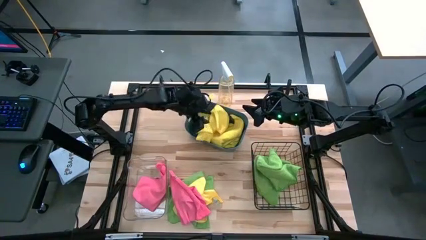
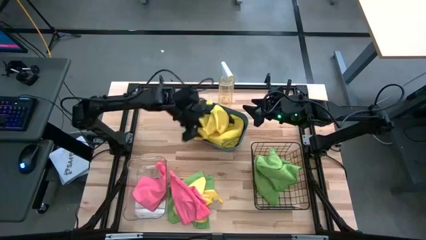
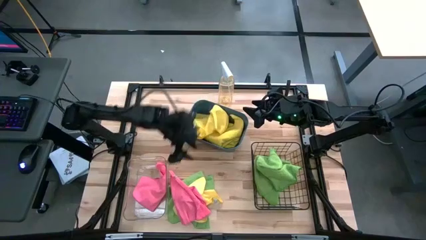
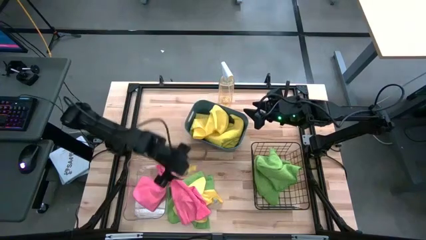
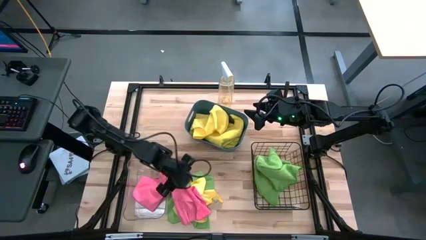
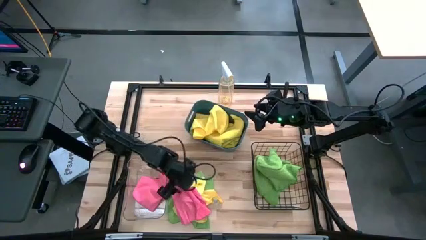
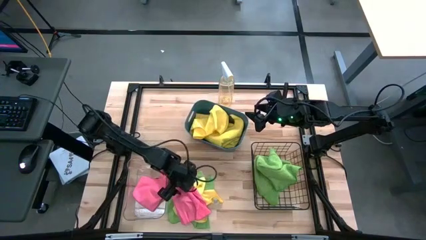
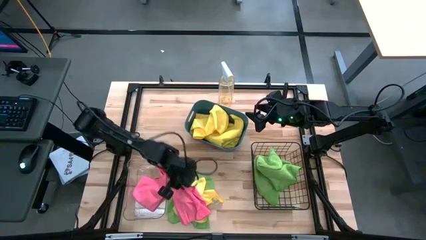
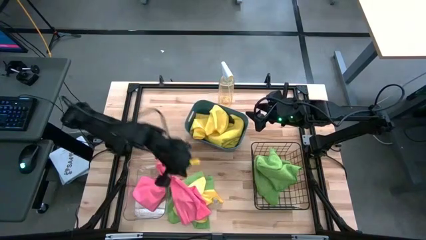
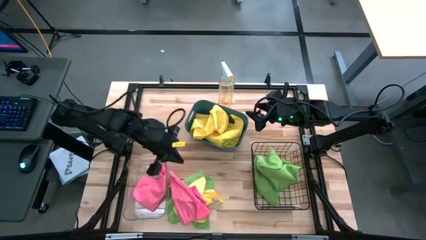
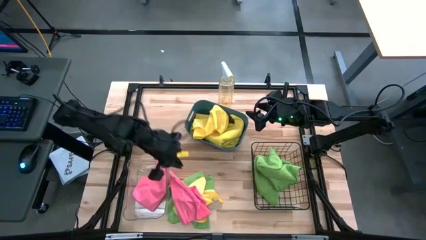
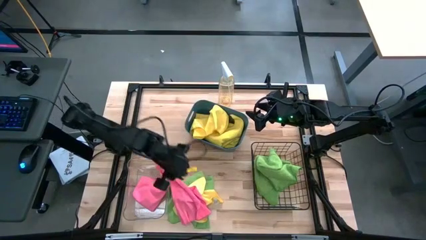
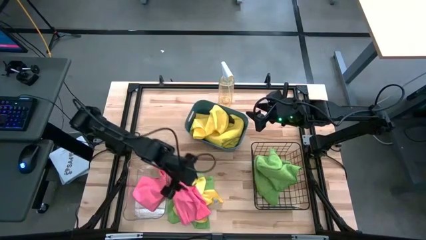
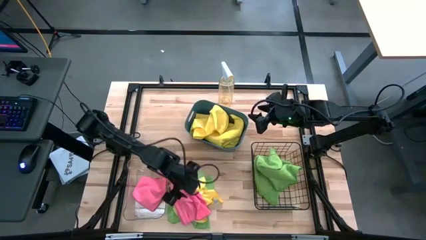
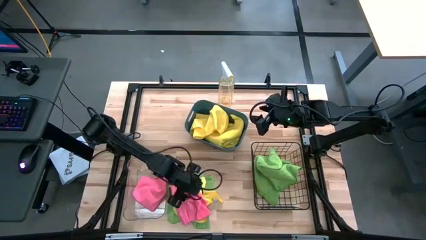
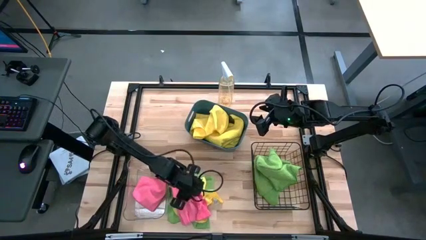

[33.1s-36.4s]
Task: Sort microfiber towel by color & place in baskets
Put the pink microfiber cloth into the transparent bin

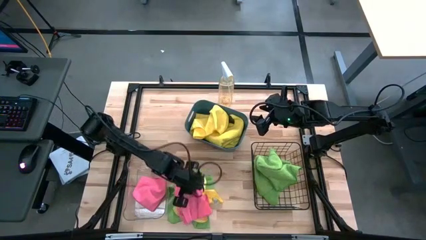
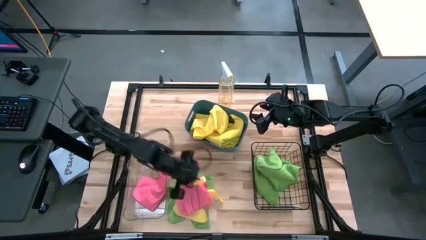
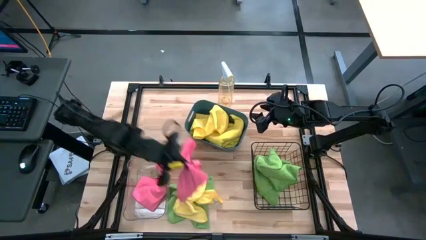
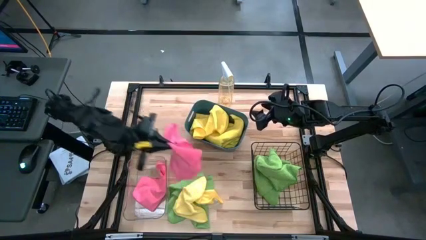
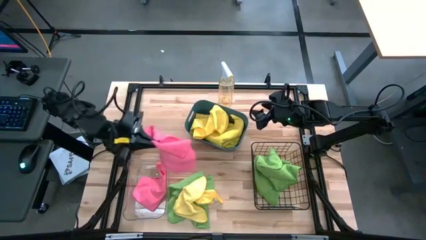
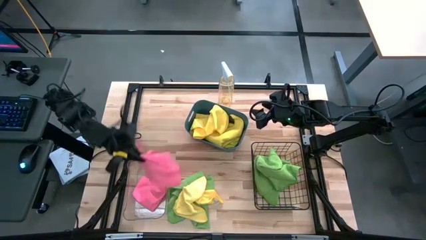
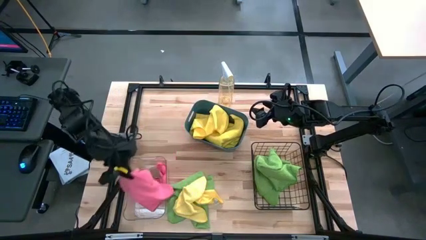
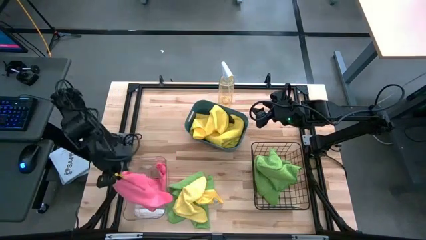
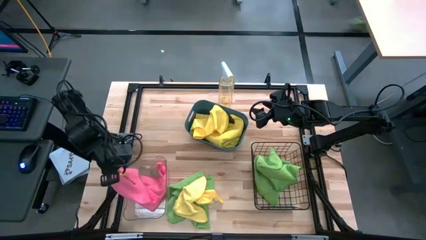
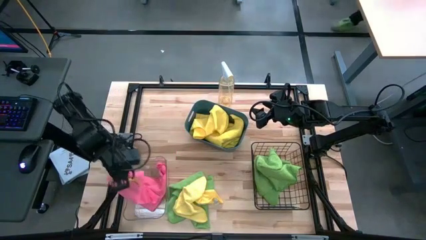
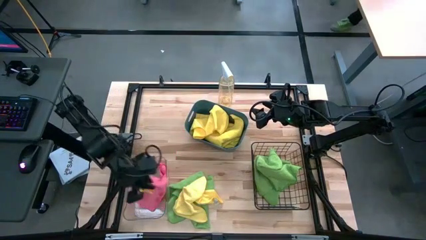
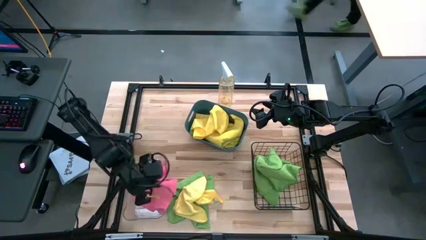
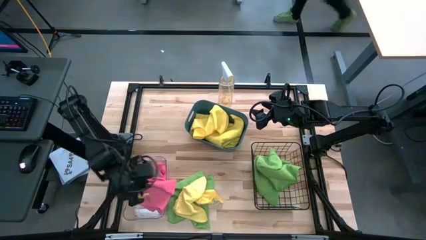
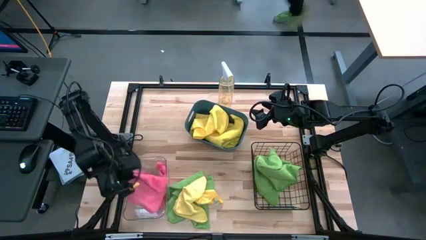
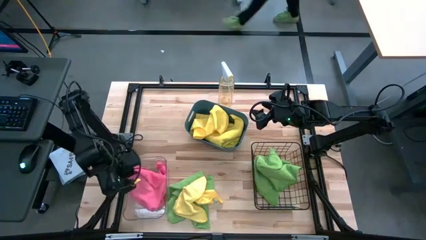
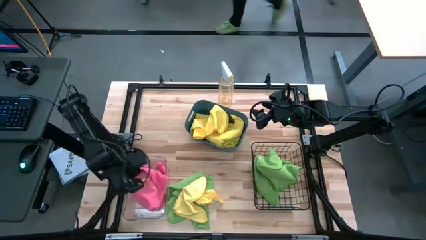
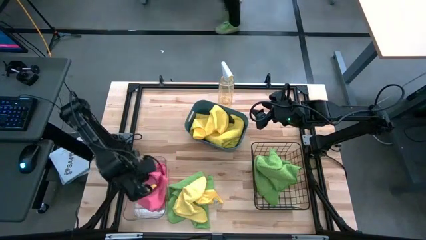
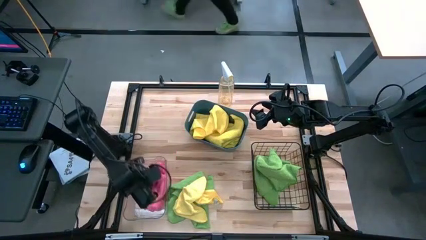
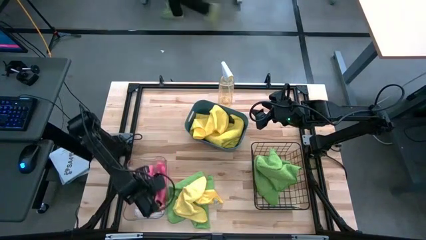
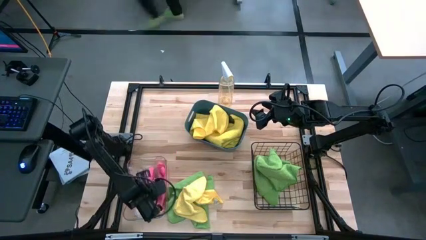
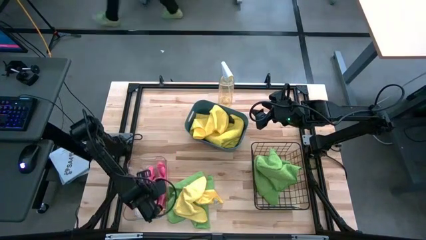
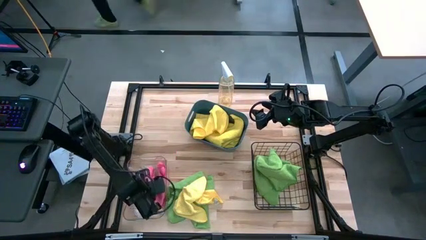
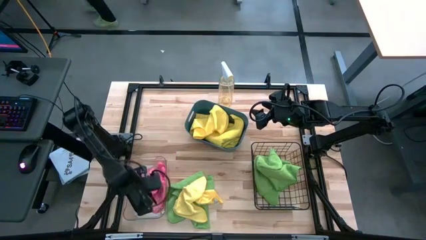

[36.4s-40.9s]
Put the pink microfiber cloth into the transparent bin

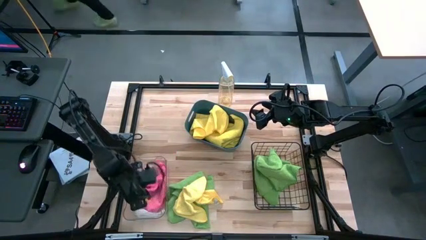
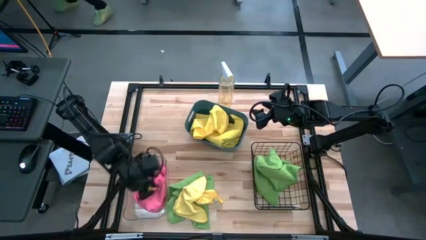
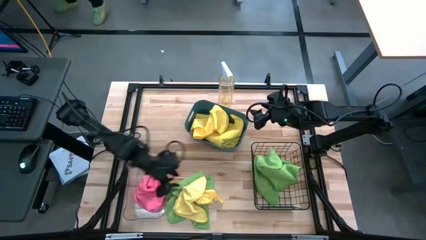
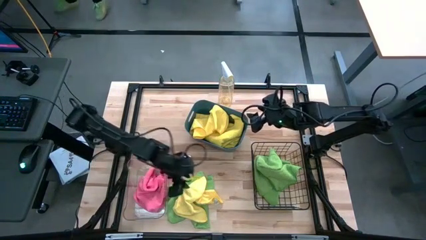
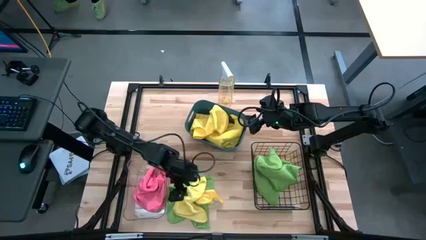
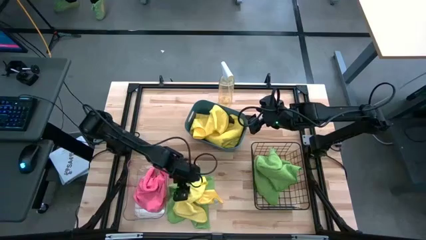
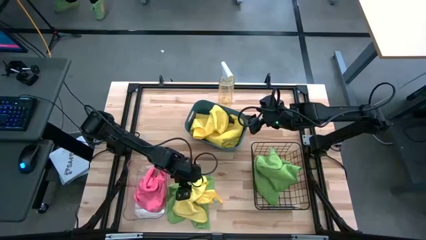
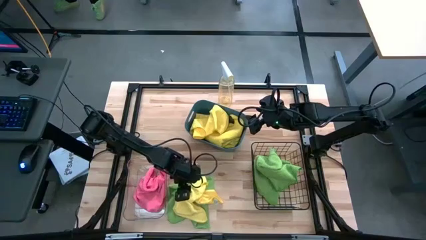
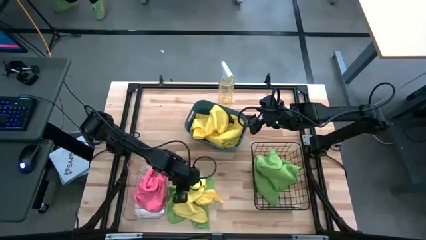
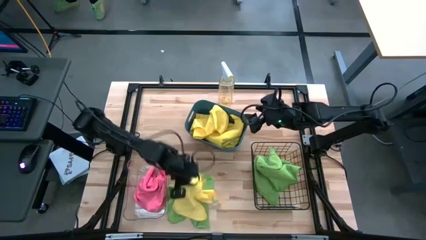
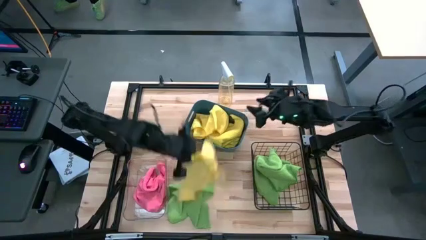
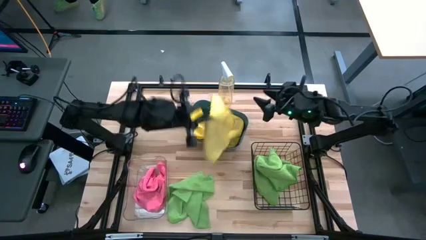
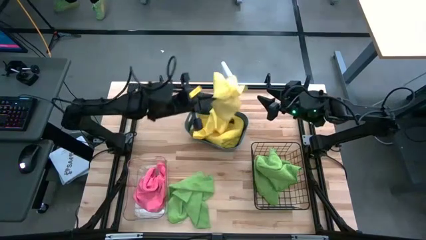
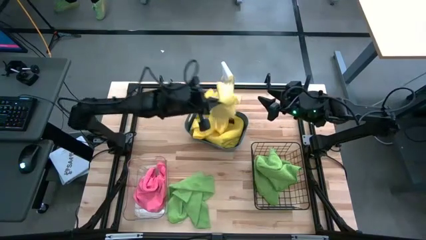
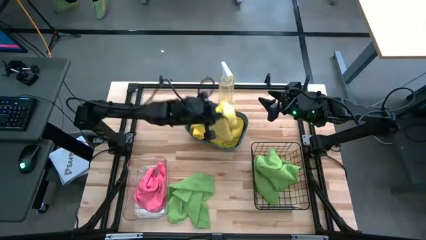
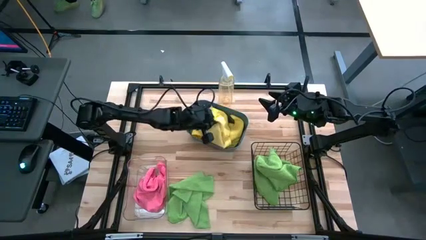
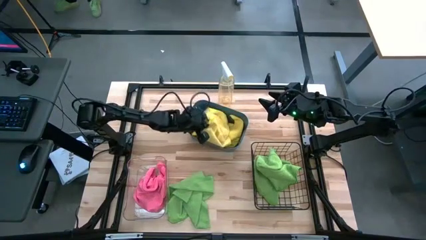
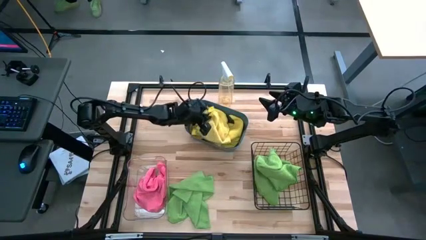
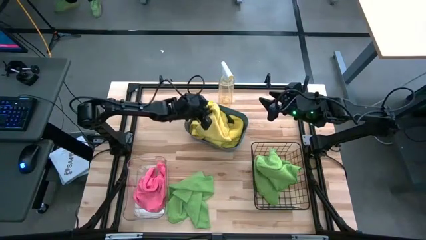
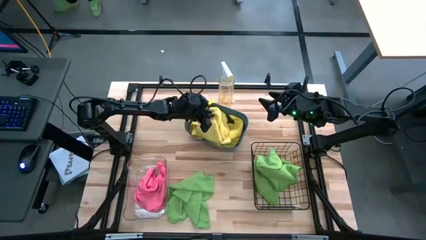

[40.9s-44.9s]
Put the yellow microfiber cloth into the blue bin

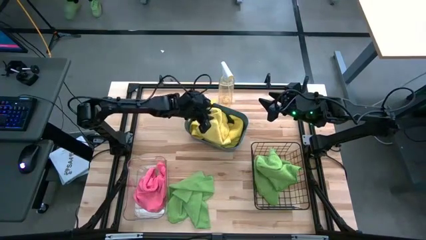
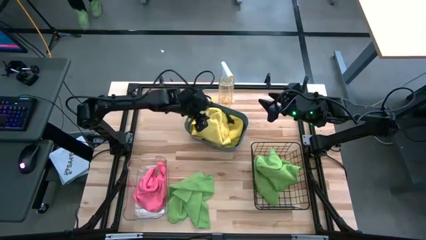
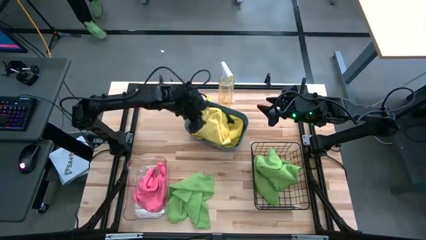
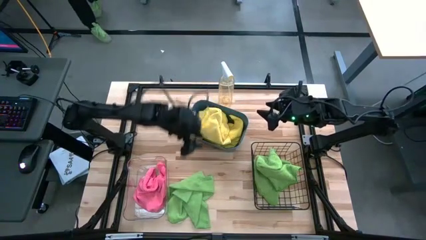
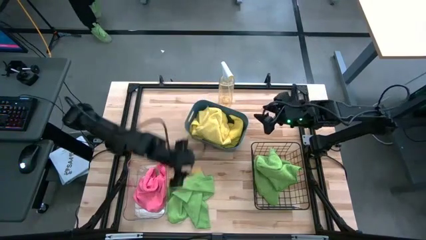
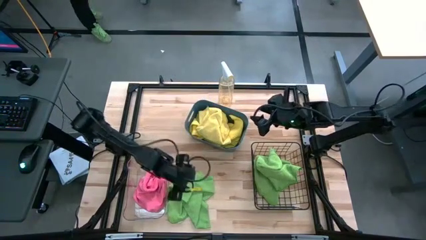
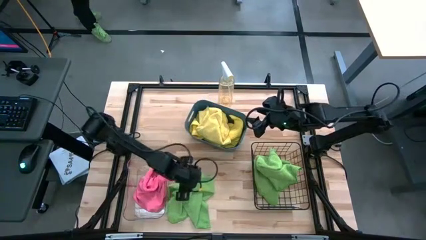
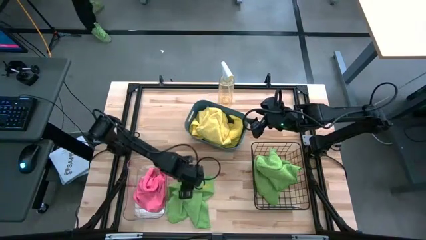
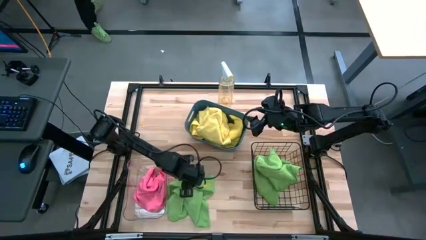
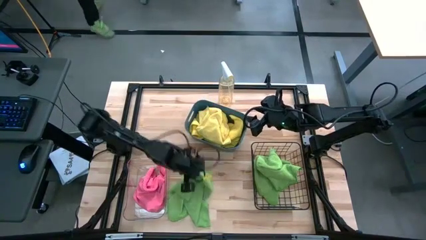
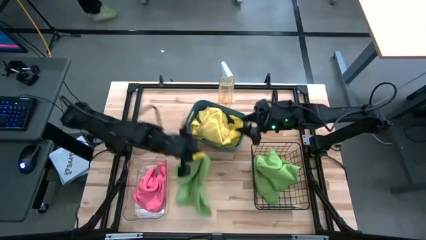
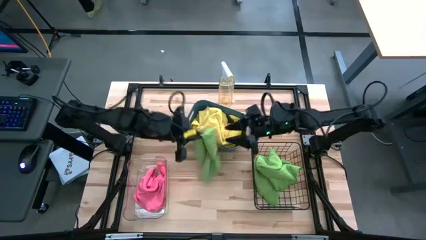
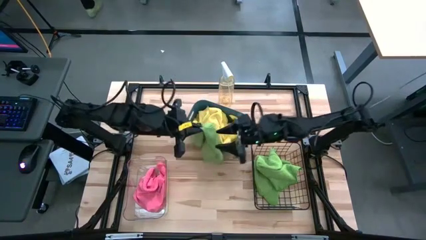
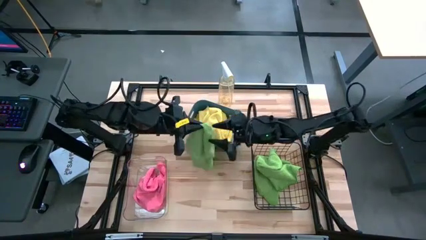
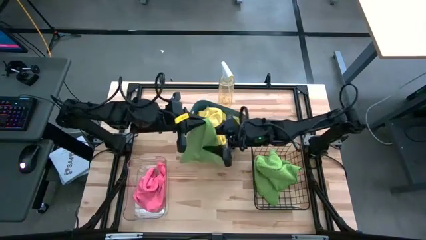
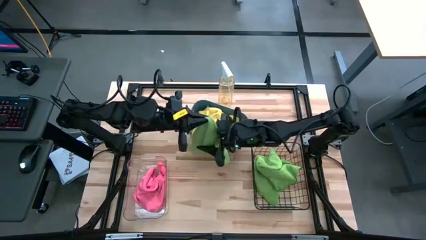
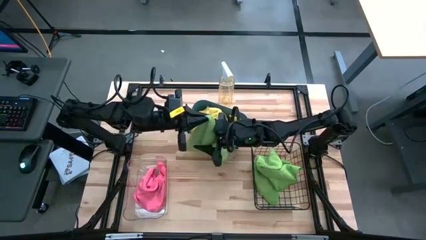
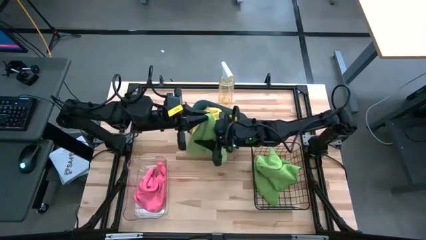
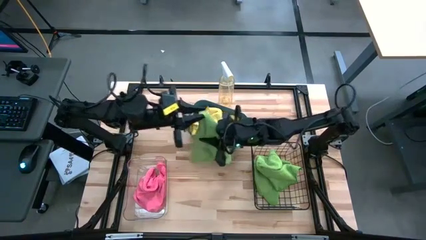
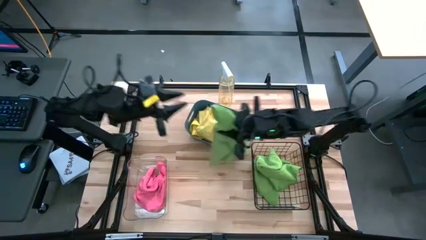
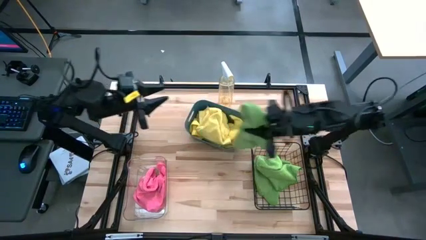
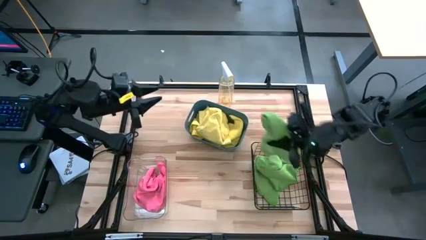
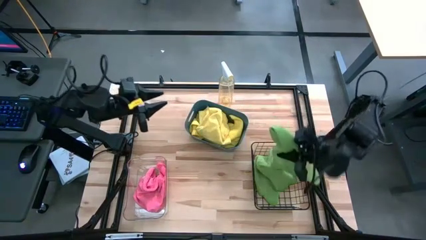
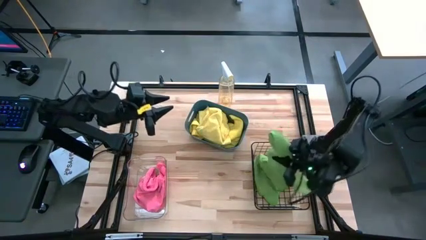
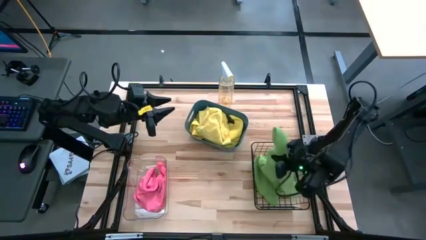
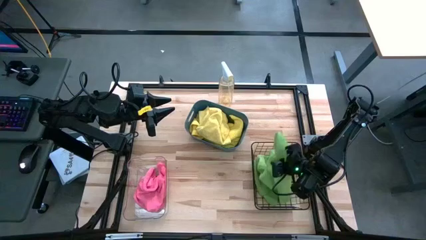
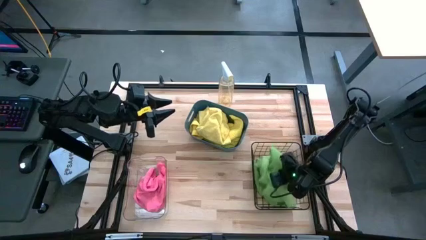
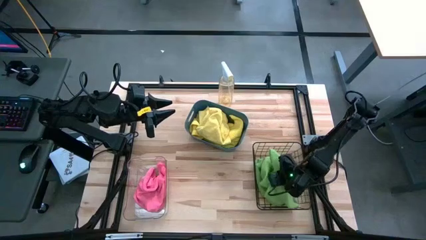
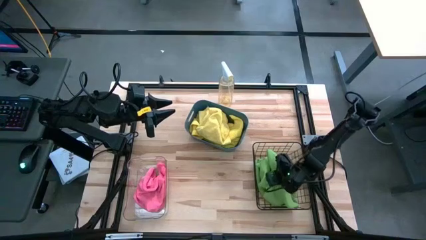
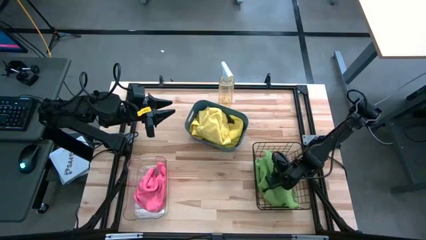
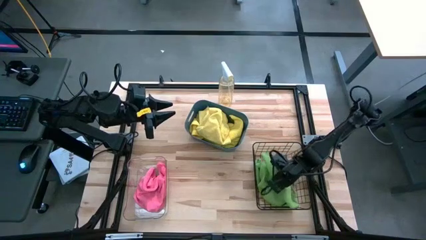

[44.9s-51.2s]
Put the green microfiber cloth into the black bin
